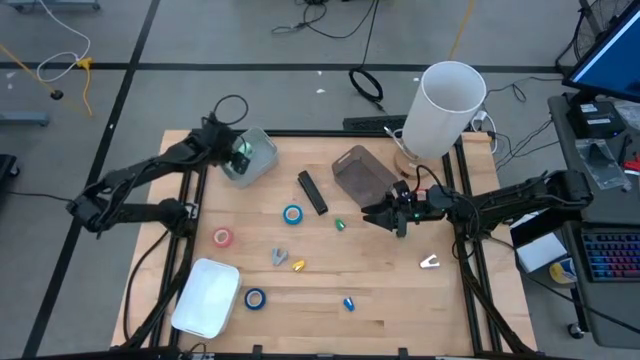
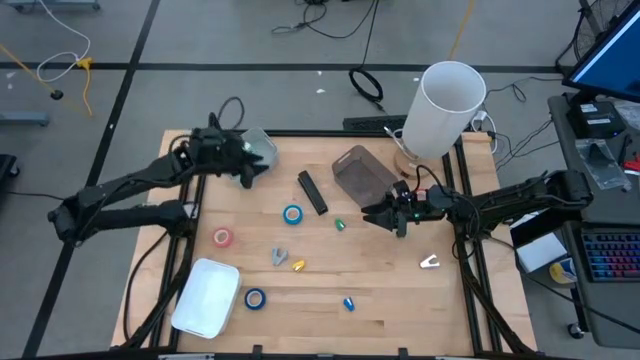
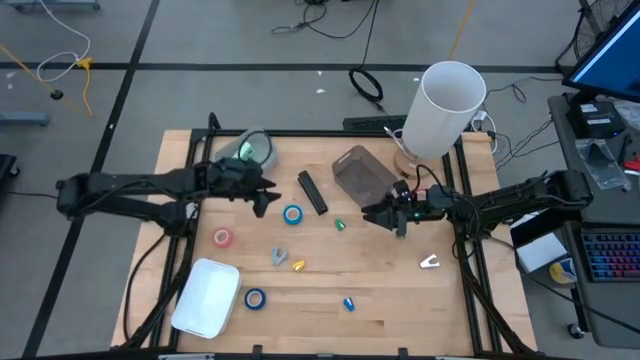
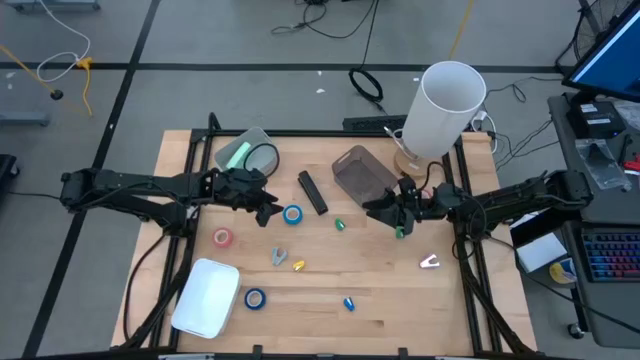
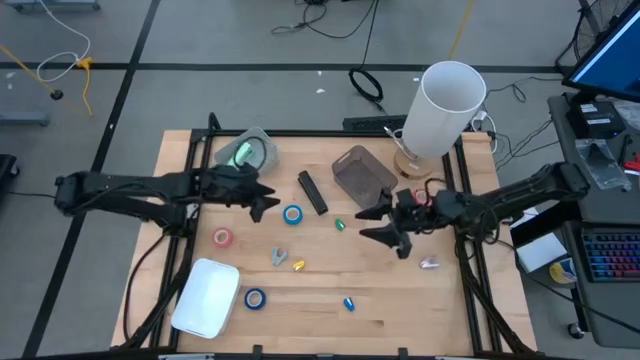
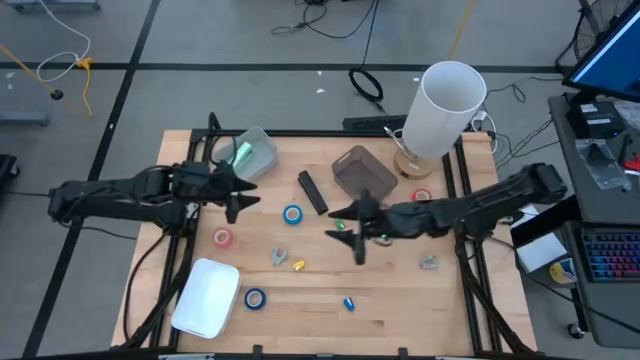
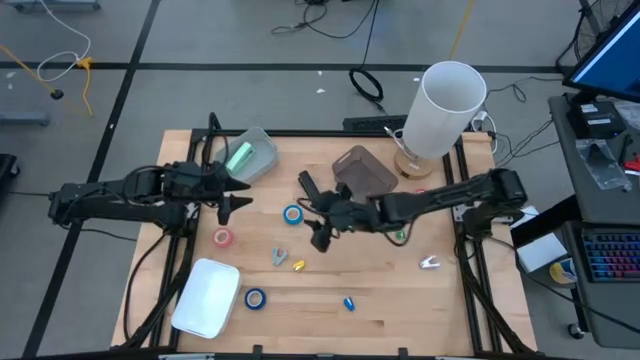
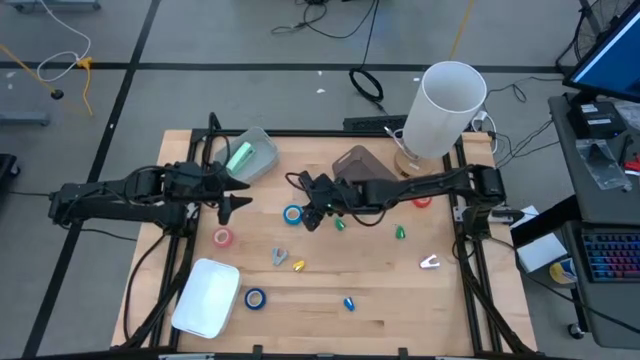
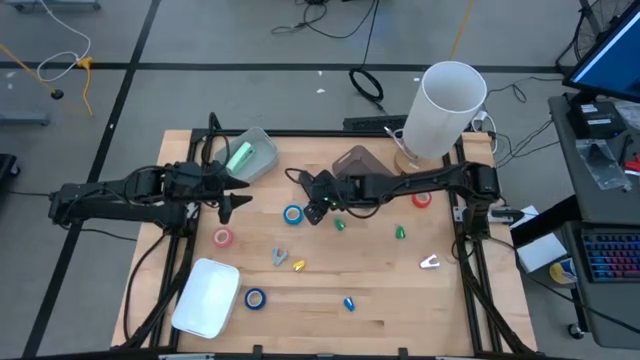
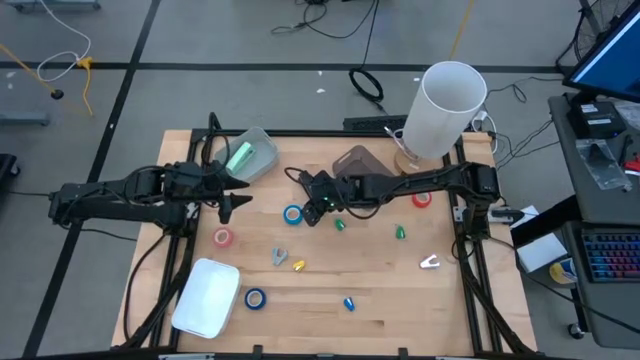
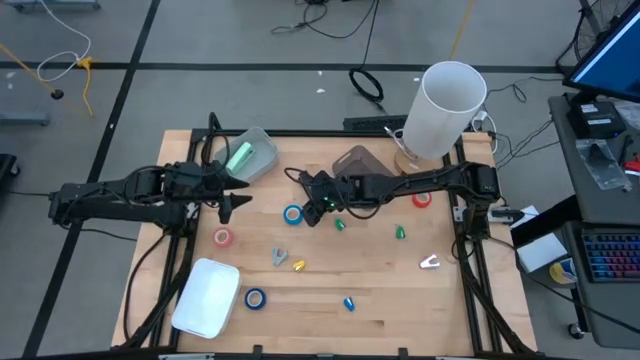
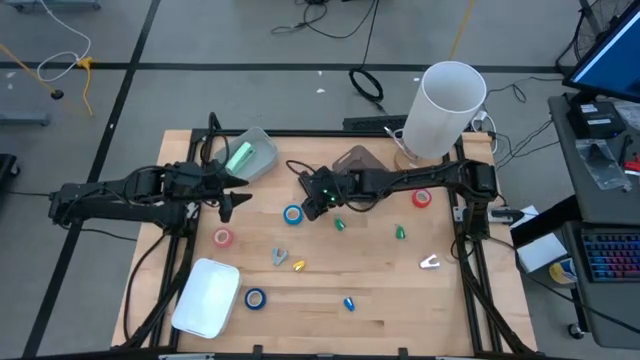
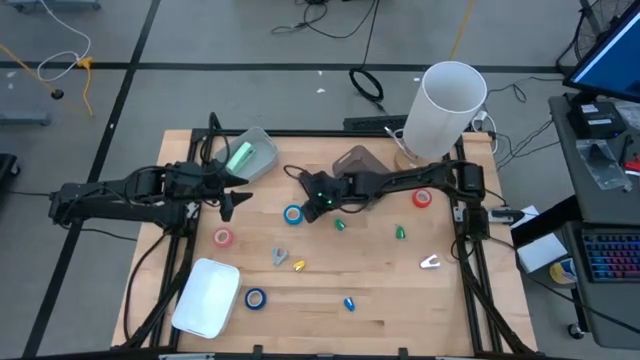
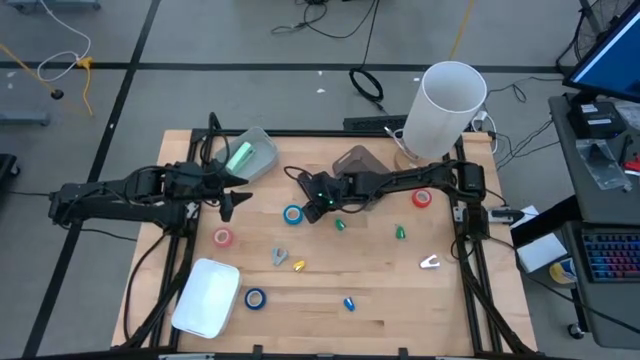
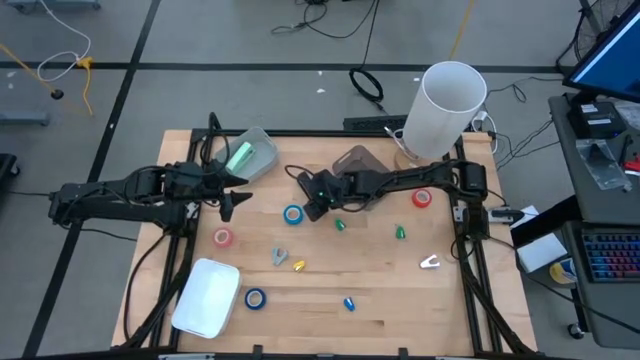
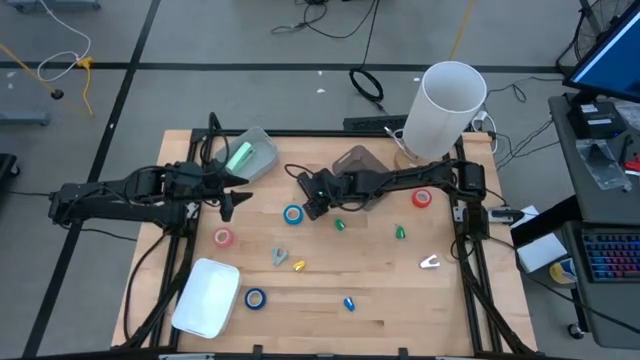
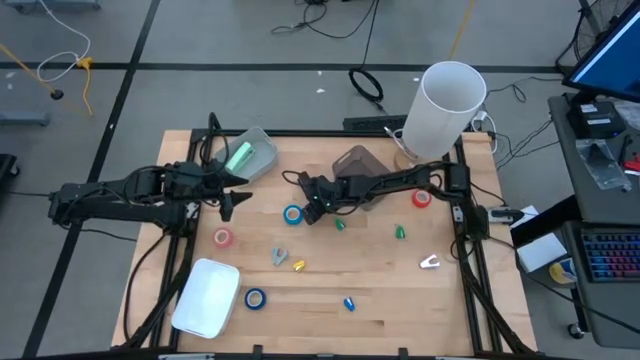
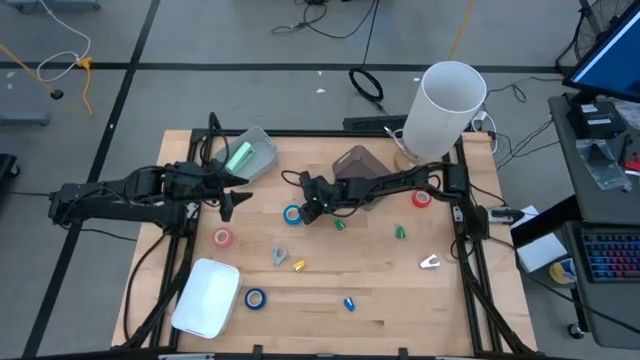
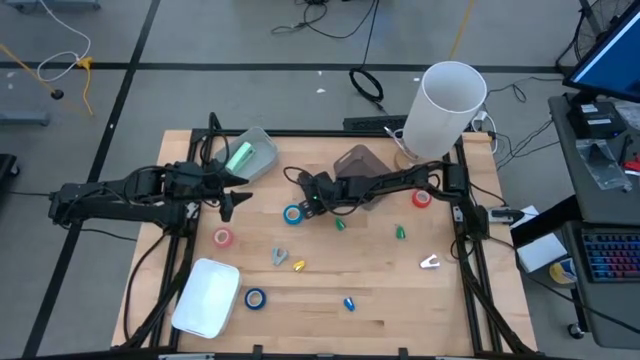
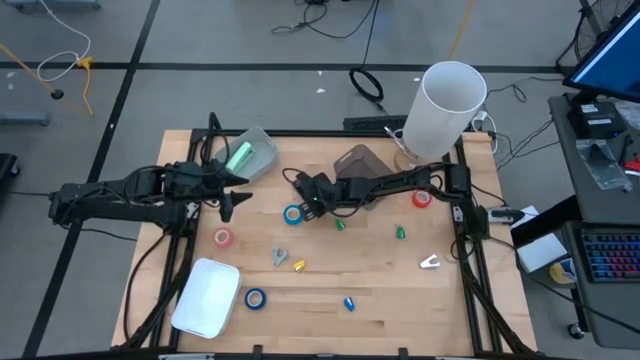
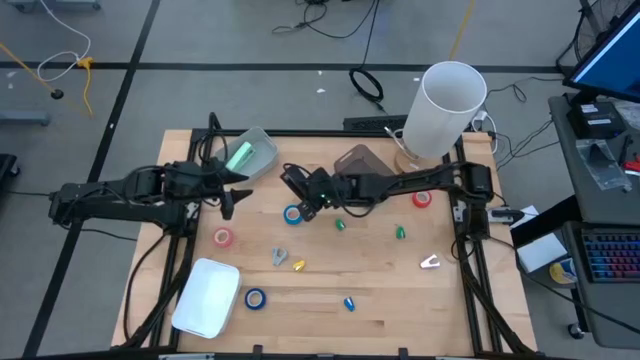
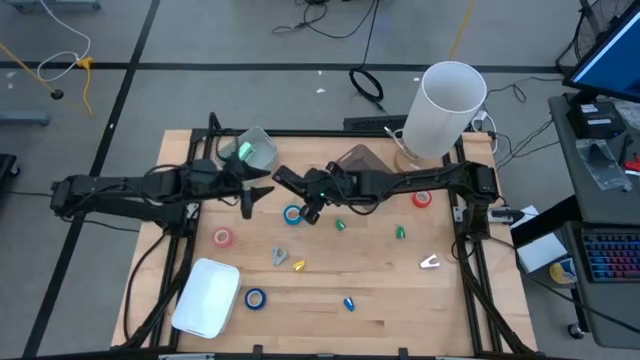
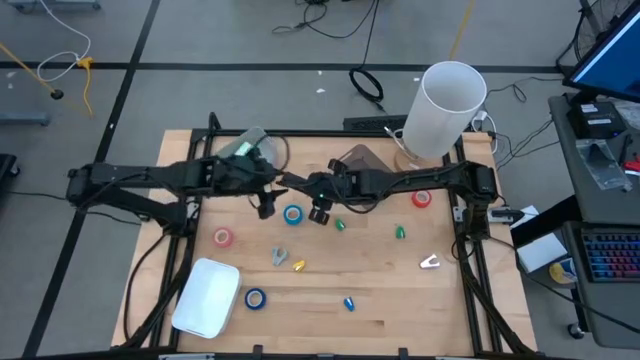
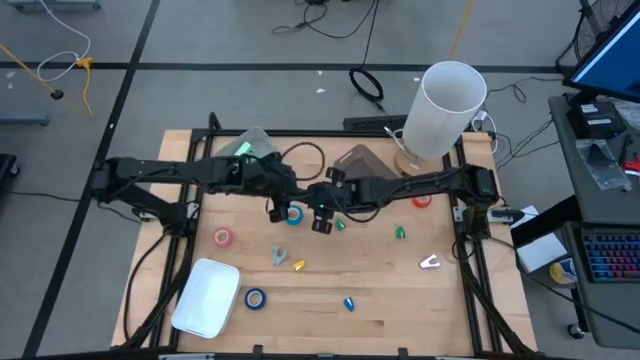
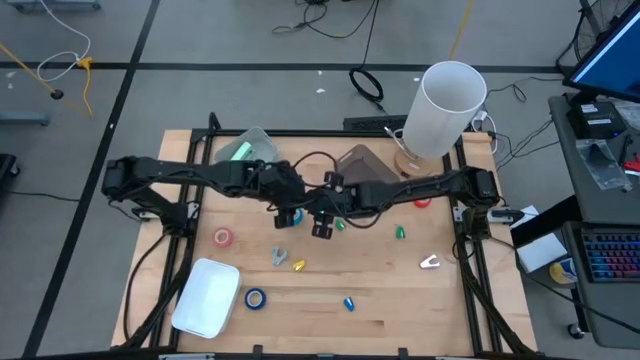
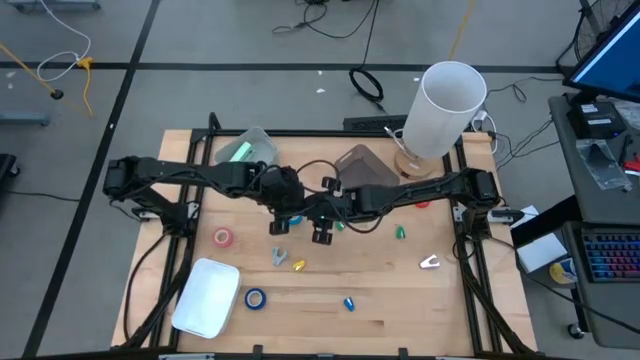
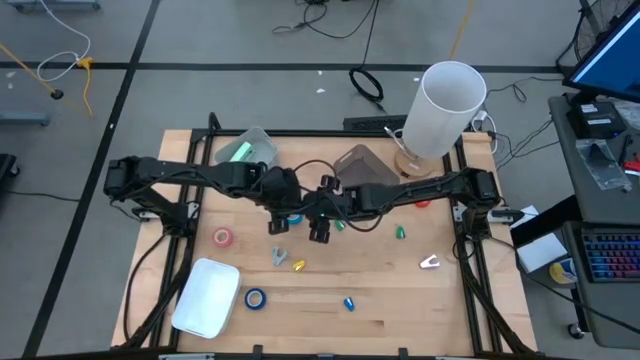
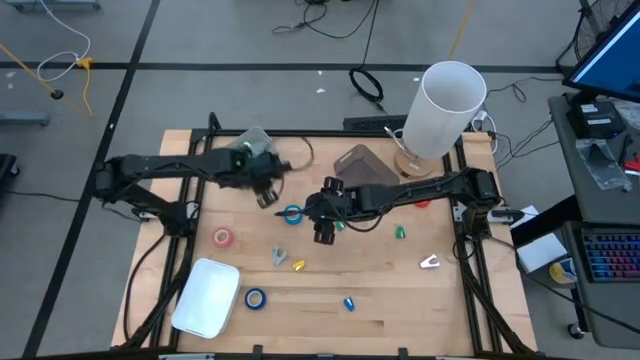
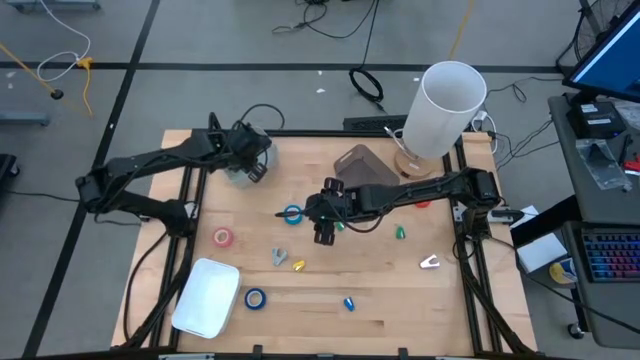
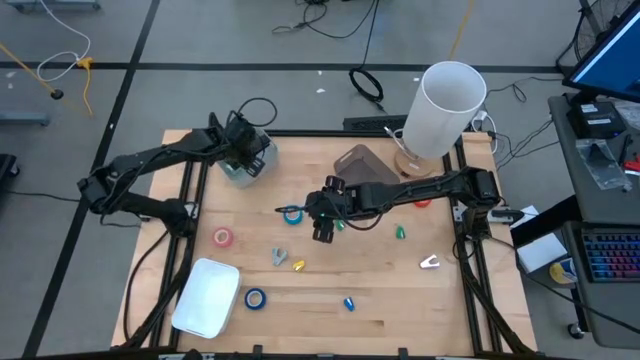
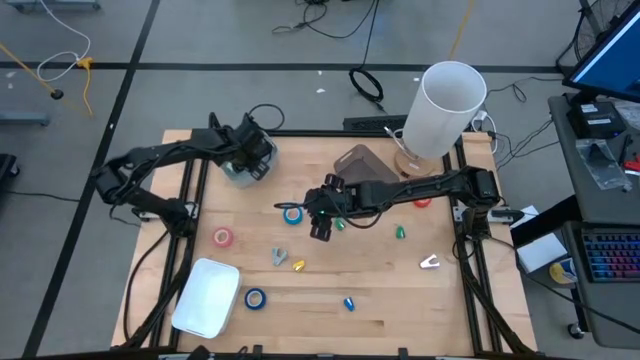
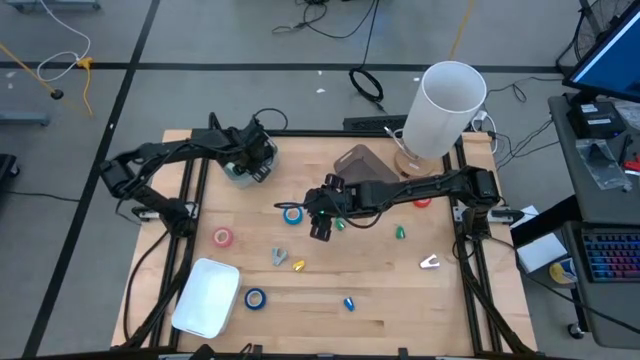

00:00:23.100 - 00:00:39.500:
Task: Pick and place Stapler, Stapler remover, tape
Put the black stapler into the gray bin

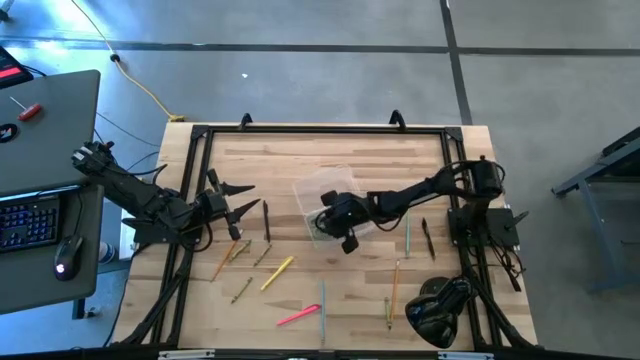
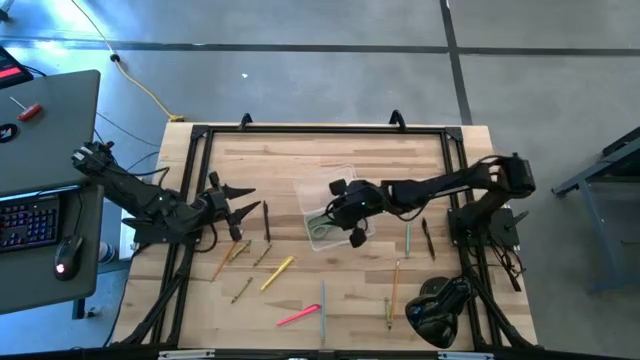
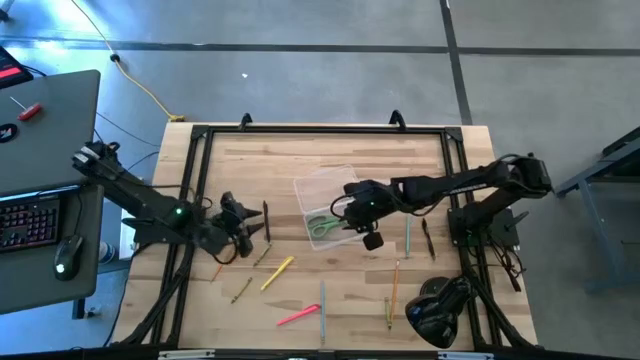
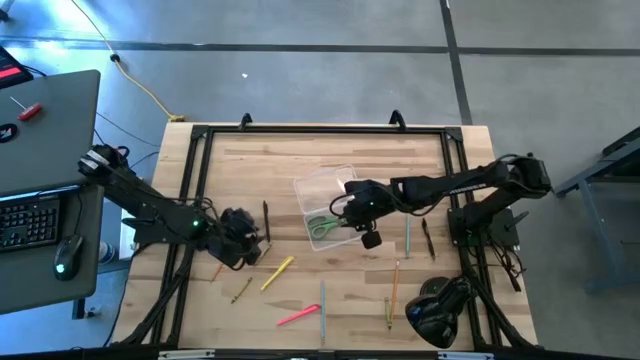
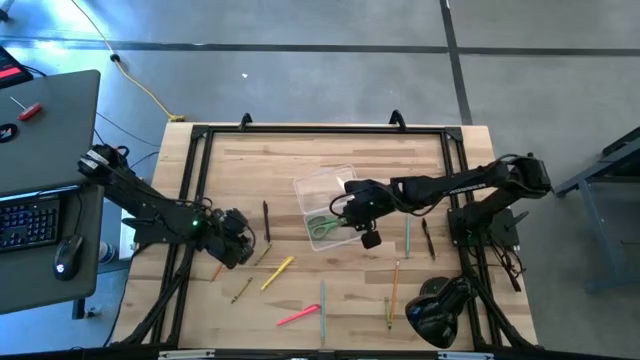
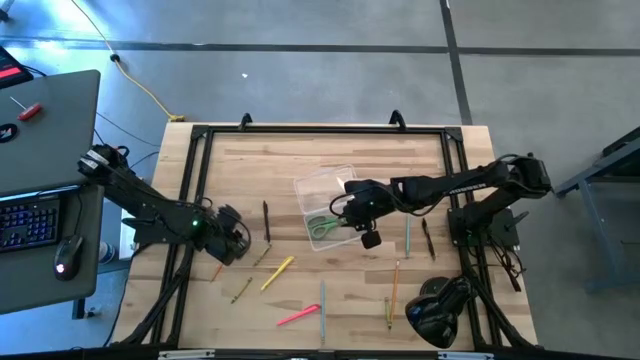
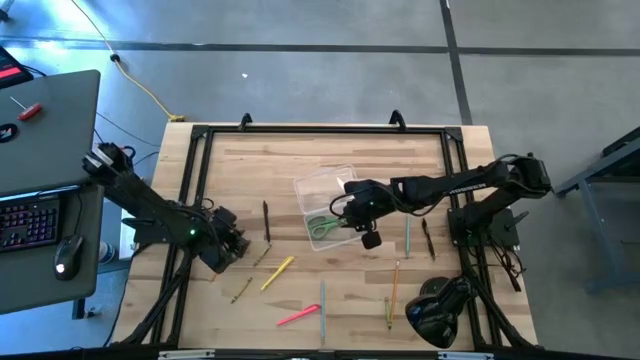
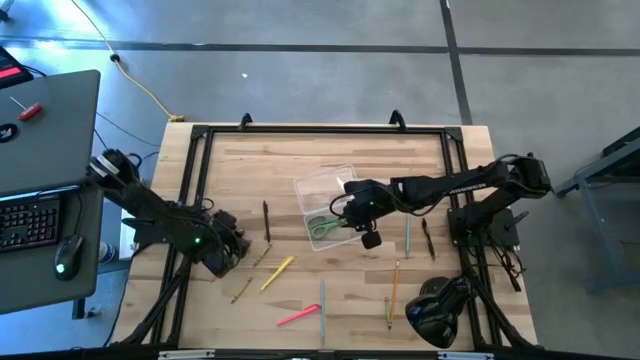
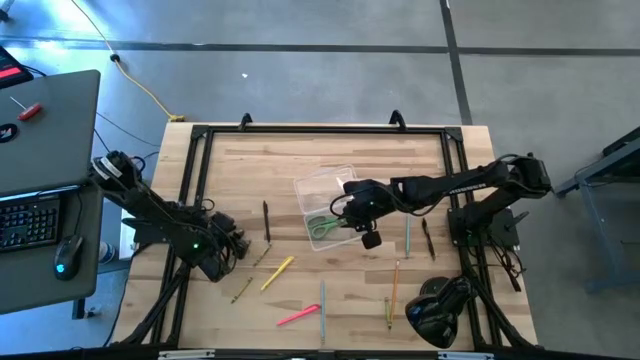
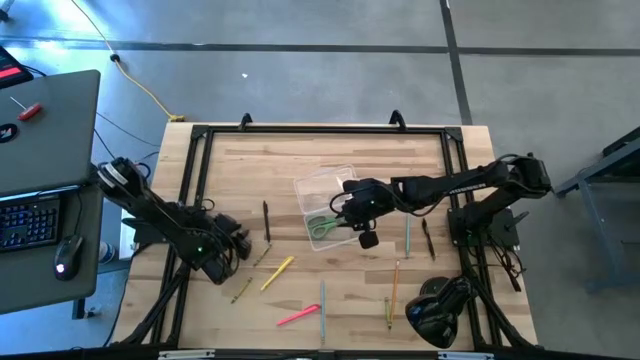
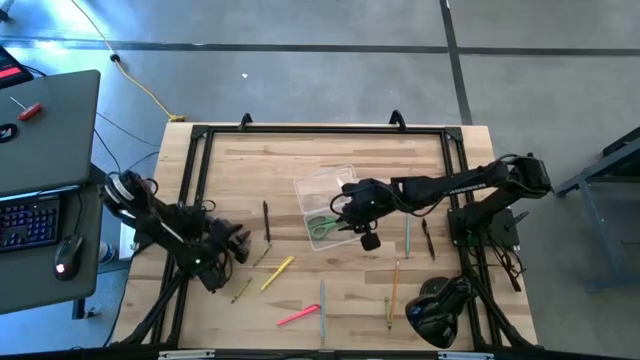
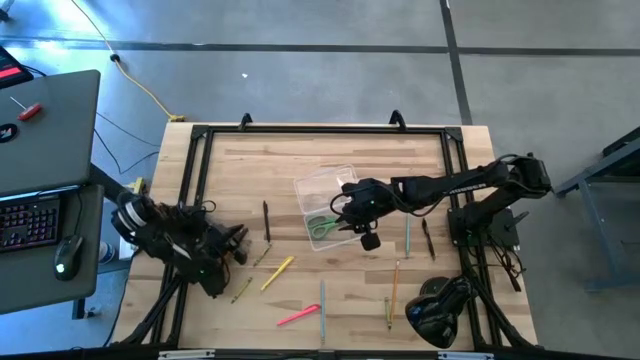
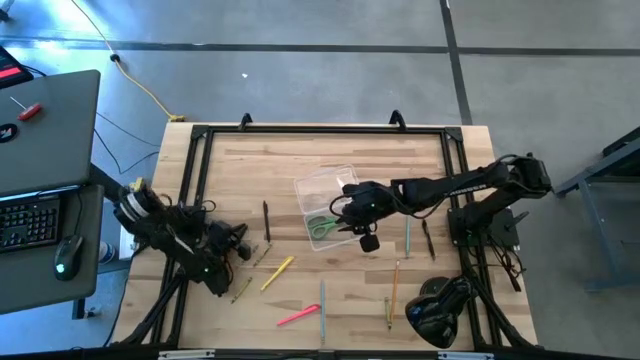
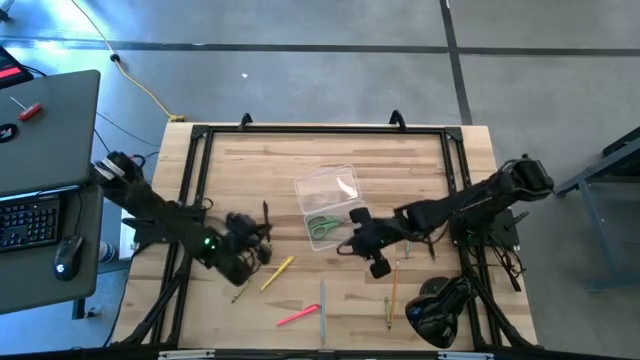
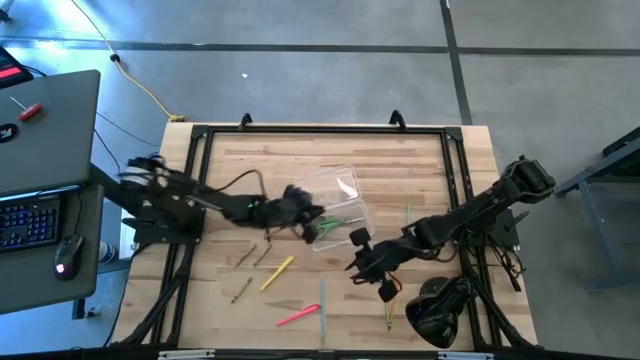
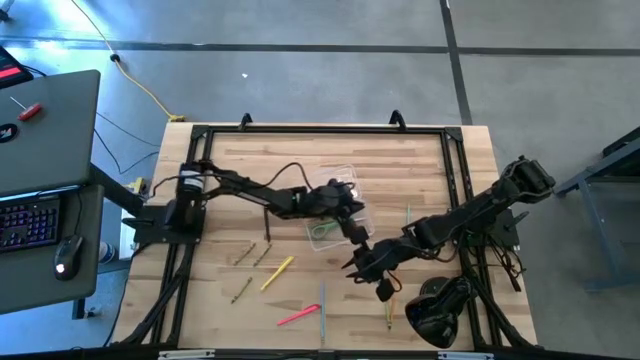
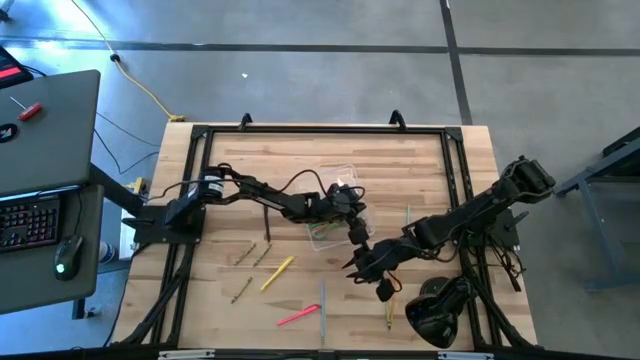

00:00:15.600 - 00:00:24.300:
Task: Pick & place school supplies into a supply box
Put the orange pencil into the supply box
